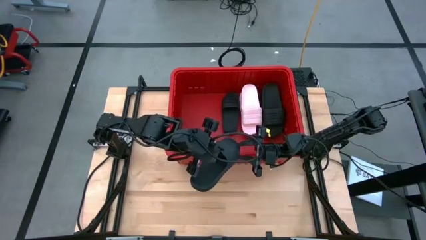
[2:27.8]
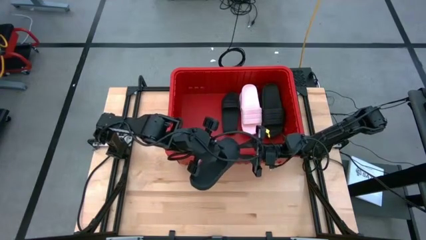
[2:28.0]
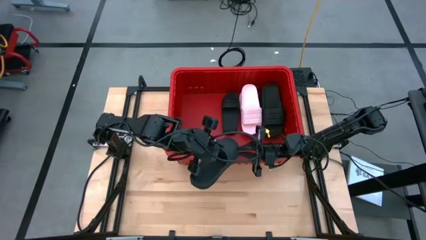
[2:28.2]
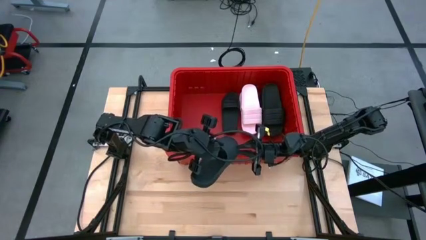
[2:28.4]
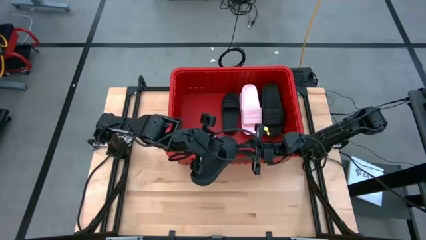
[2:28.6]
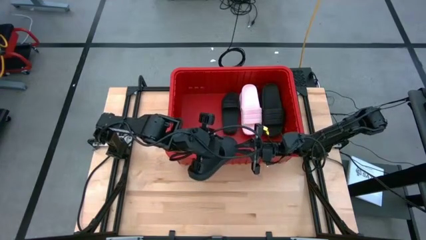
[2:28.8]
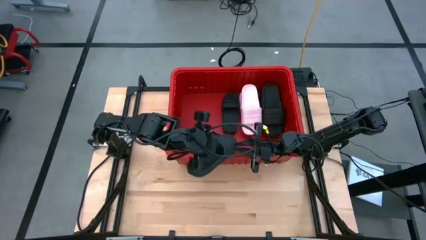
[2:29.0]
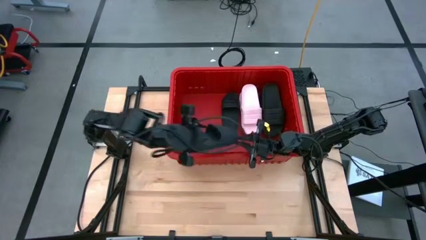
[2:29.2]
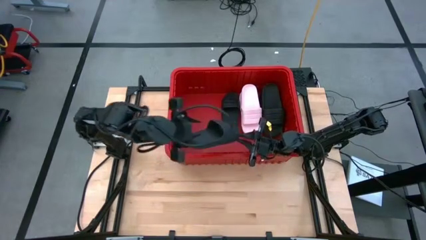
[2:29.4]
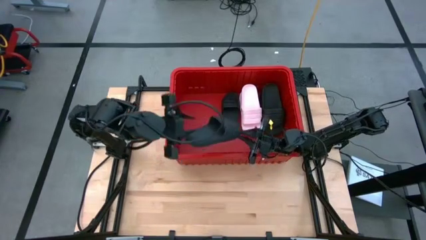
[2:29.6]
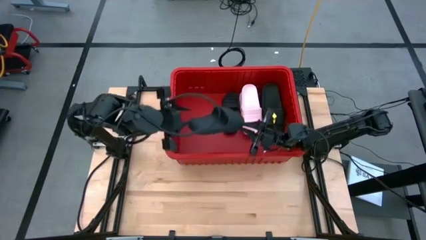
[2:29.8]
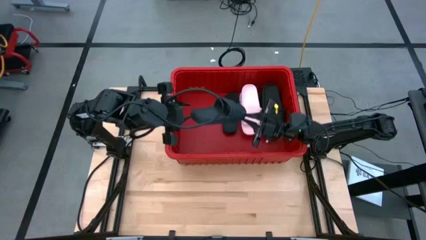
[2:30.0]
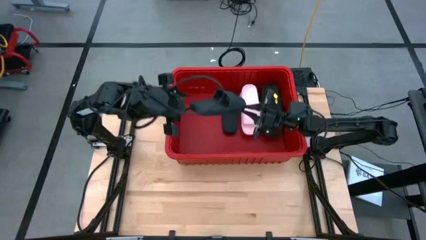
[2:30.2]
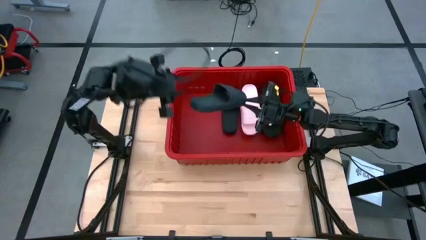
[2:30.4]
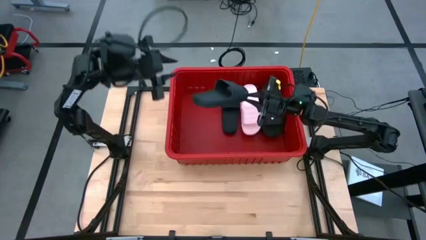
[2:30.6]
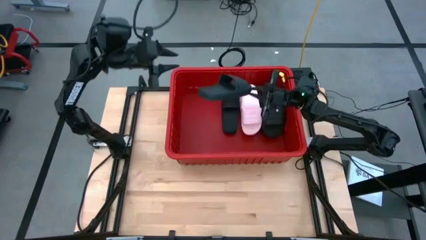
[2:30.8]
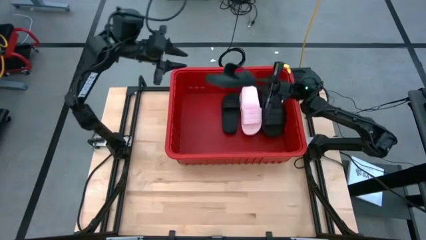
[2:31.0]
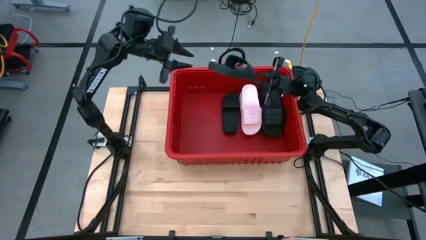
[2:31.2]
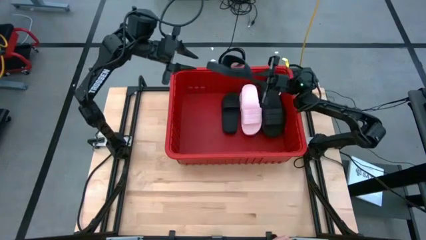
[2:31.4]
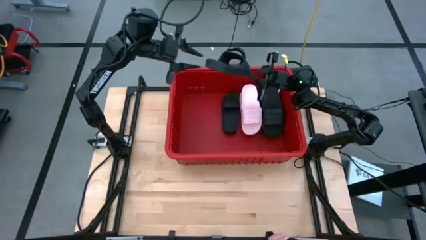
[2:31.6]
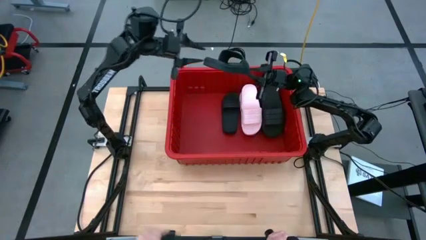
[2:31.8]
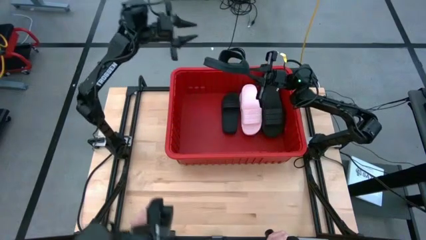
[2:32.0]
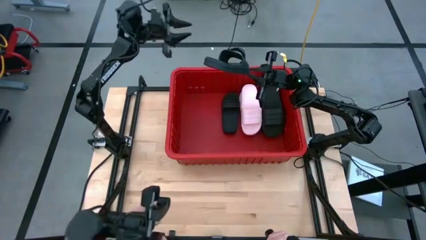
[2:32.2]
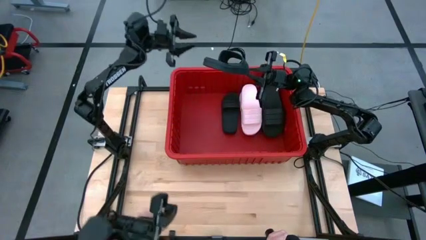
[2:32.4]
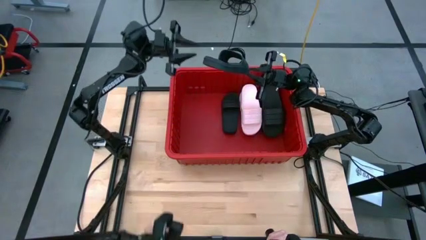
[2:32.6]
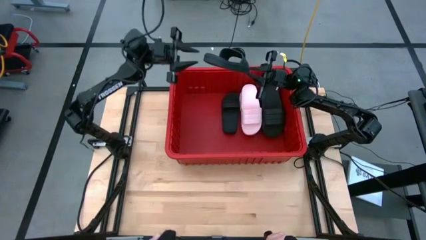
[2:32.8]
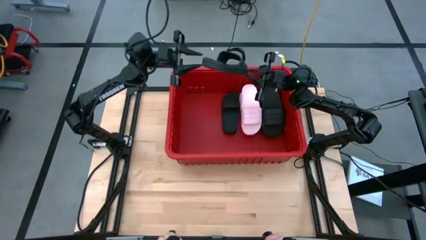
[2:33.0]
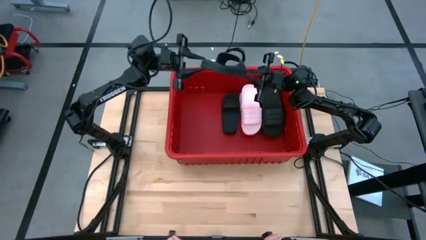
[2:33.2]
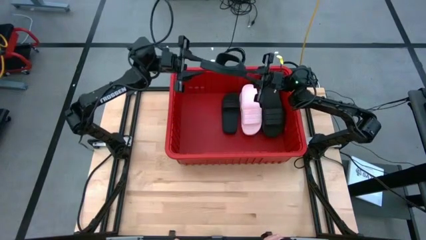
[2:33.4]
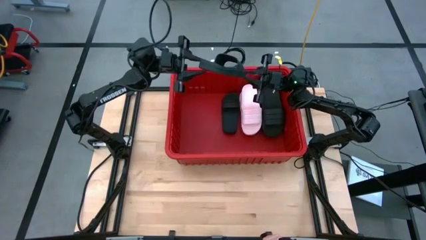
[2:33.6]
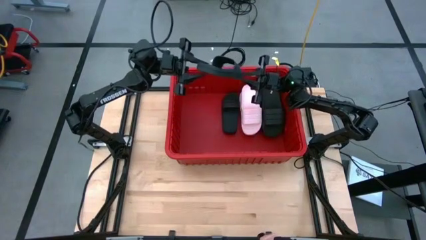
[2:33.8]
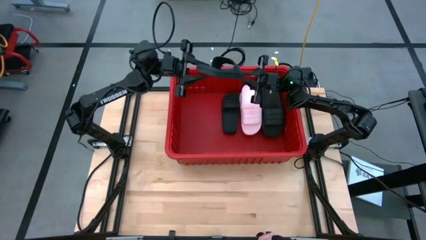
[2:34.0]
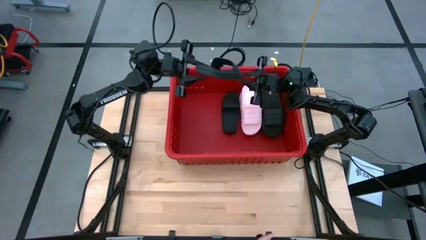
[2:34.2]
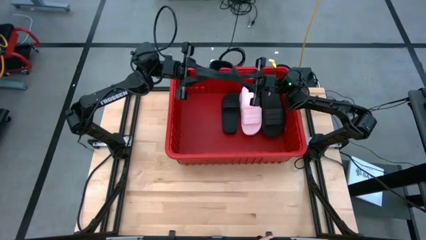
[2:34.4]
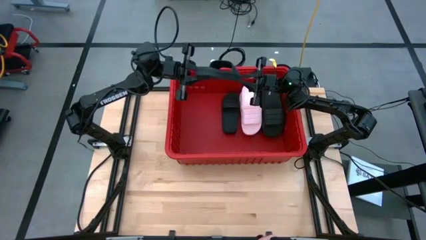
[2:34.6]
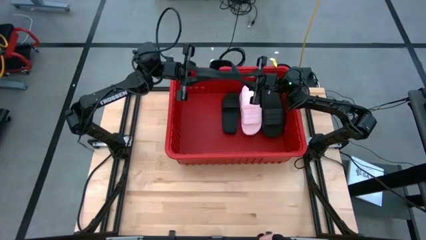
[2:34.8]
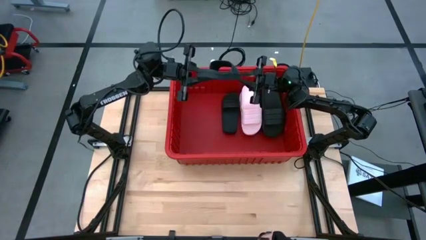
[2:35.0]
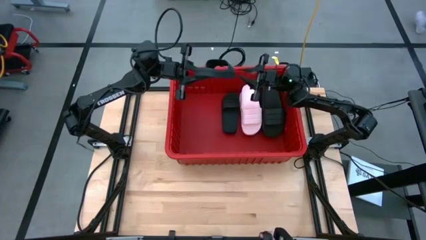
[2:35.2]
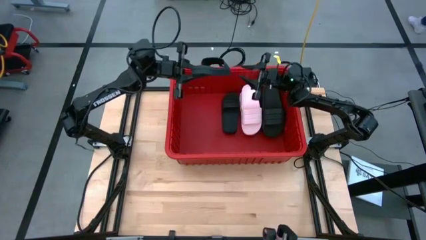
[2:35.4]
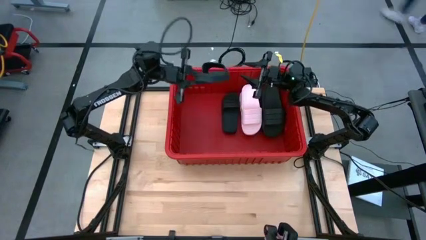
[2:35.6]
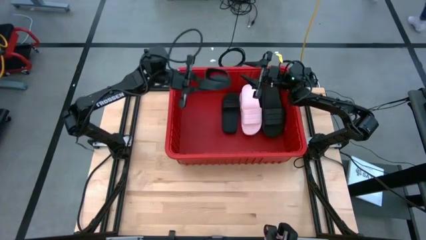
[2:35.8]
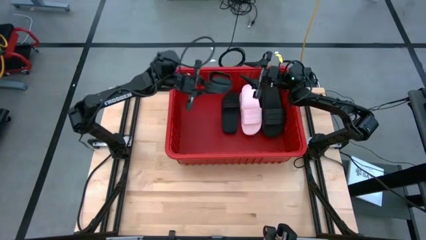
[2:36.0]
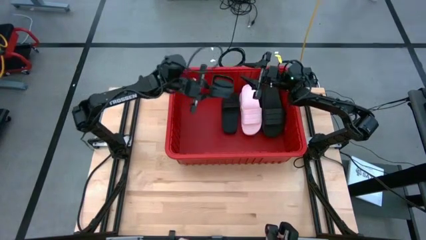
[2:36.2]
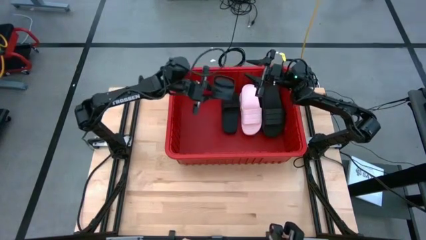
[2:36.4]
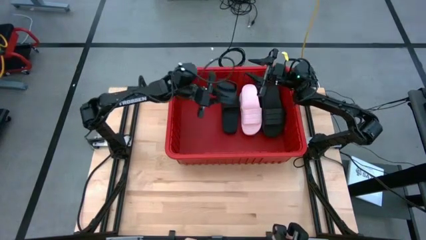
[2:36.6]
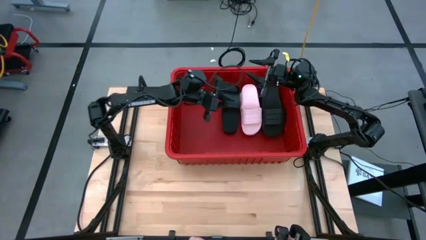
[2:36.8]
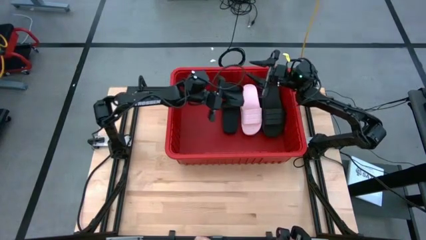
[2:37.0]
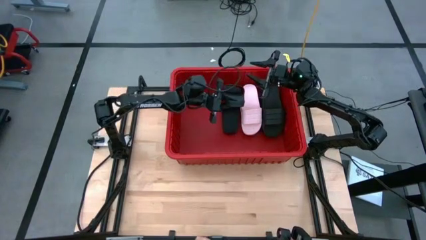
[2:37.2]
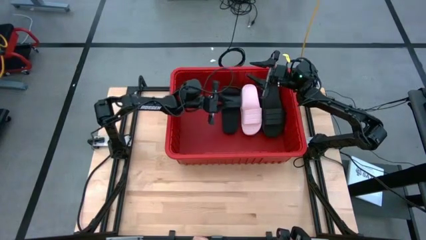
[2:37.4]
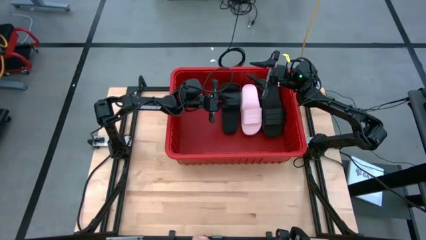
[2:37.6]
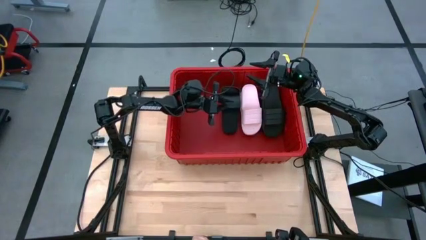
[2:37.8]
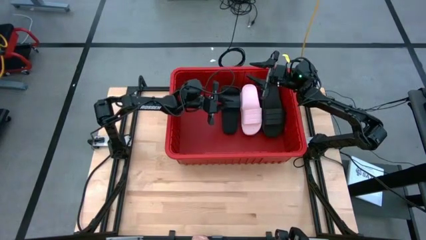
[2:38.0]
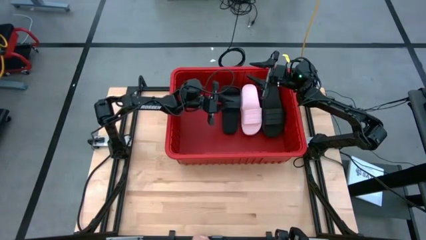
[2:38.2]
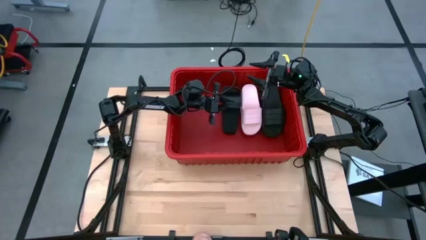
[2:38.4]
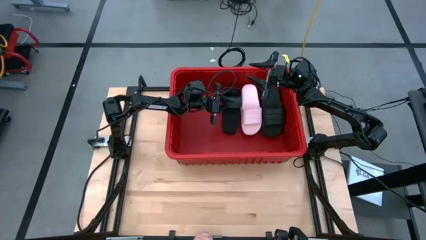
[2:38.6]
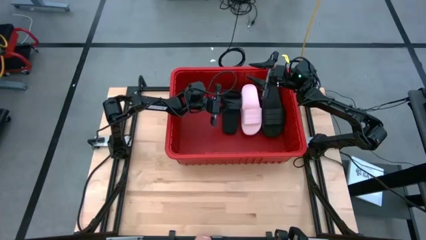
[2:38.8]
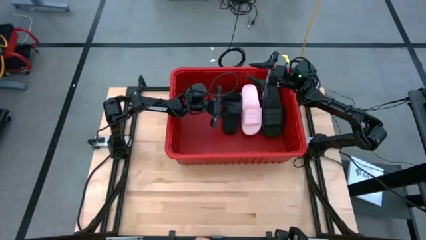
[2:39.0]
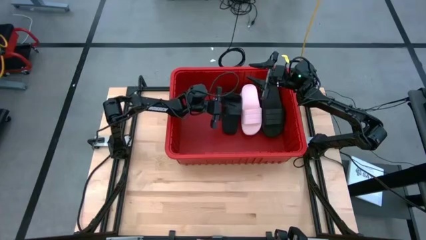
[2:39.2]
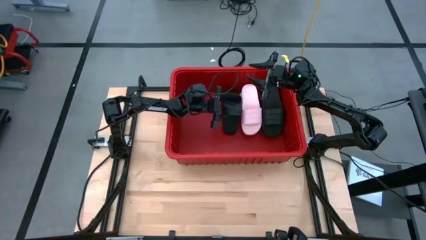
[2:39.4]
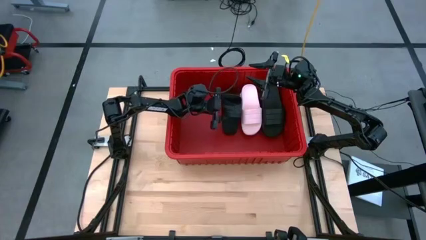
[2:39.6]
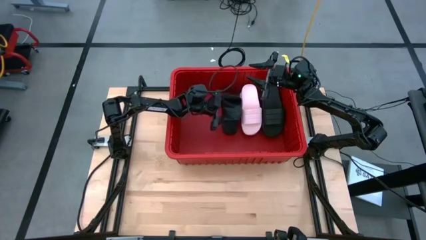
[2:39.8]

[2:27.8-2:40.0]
Task: Pick and place slides into bin
Put the black slide into the red organizer bin
